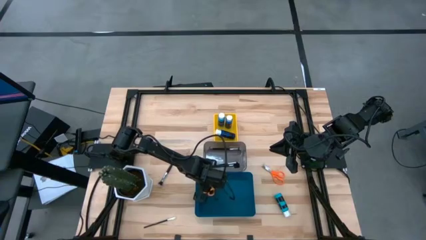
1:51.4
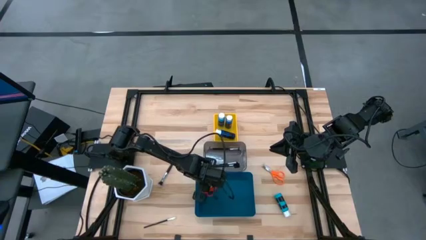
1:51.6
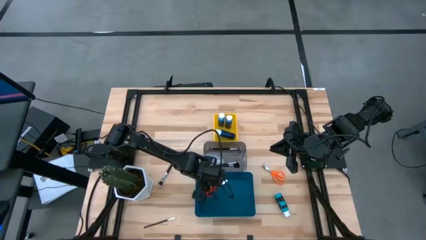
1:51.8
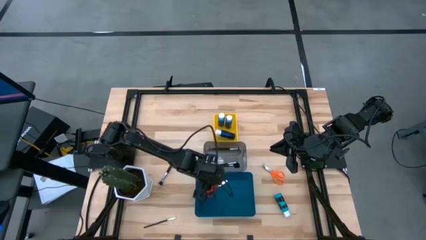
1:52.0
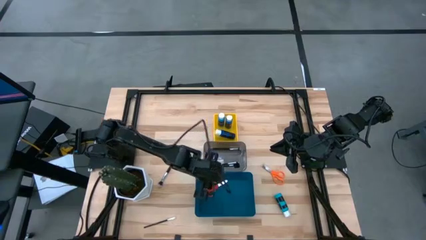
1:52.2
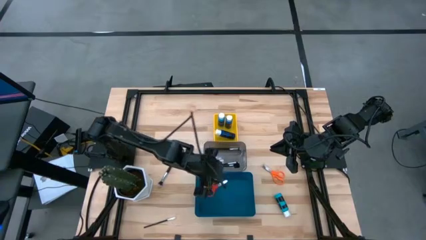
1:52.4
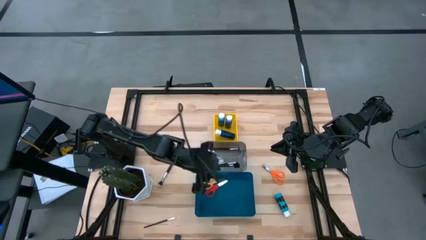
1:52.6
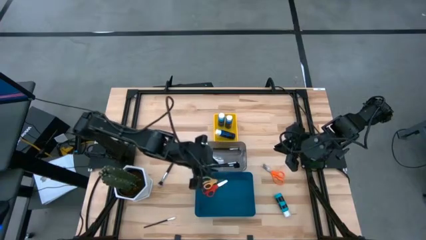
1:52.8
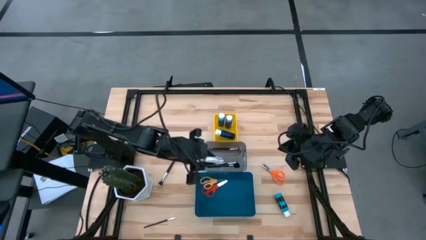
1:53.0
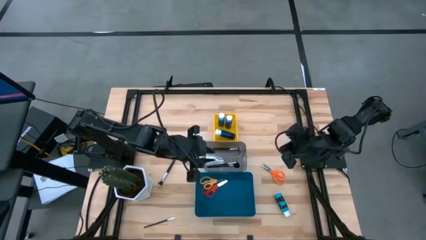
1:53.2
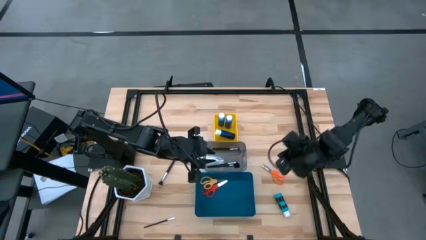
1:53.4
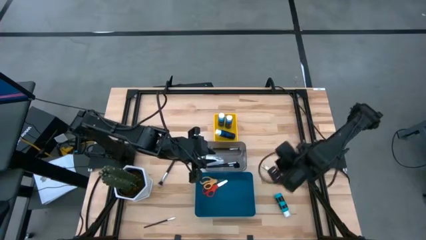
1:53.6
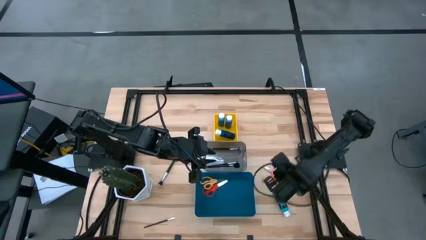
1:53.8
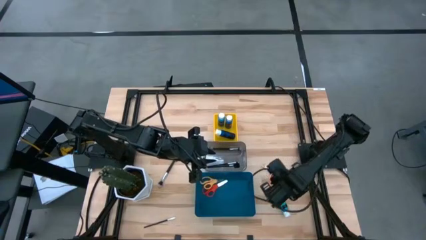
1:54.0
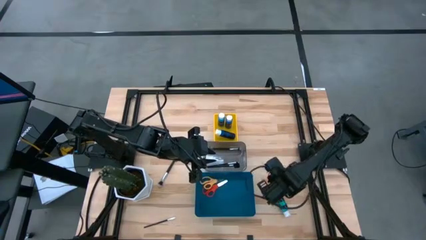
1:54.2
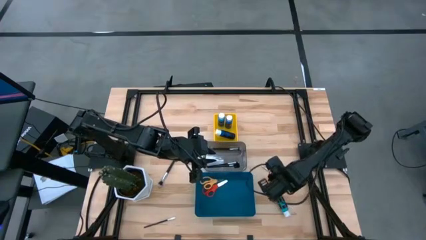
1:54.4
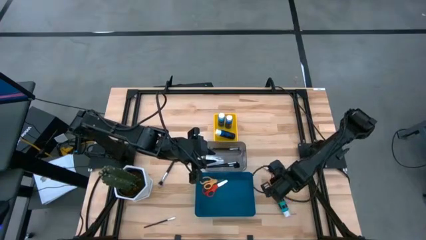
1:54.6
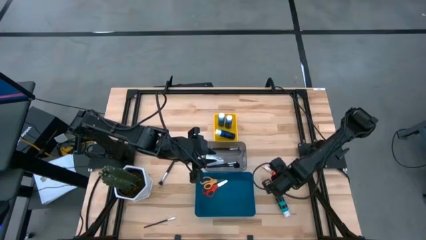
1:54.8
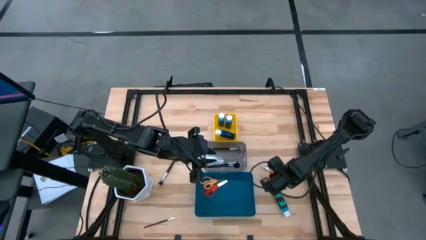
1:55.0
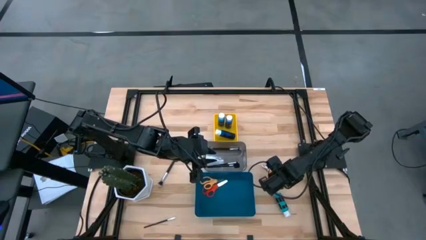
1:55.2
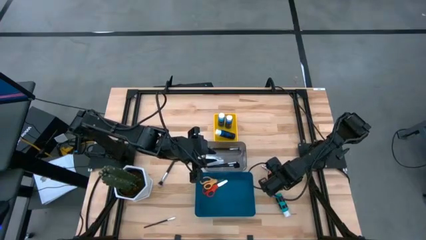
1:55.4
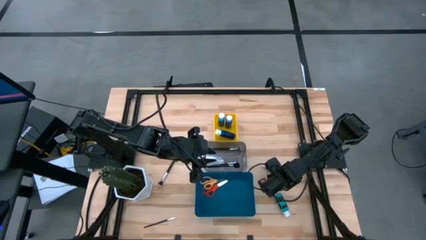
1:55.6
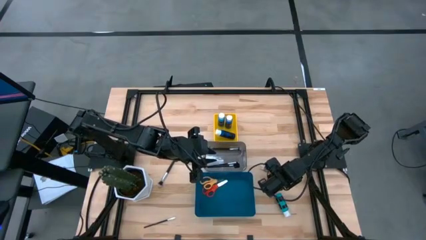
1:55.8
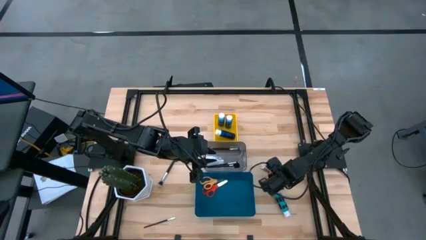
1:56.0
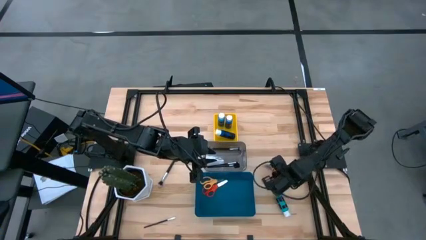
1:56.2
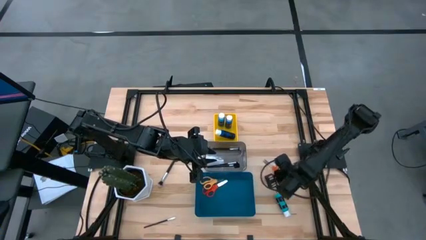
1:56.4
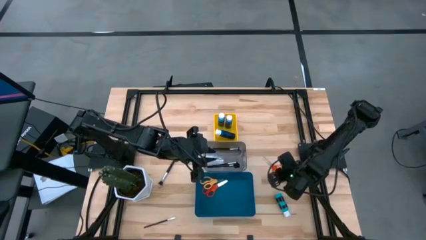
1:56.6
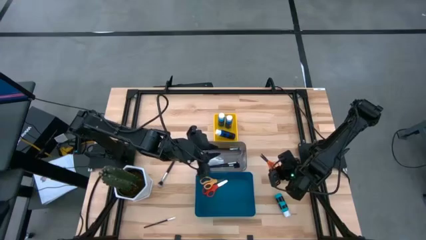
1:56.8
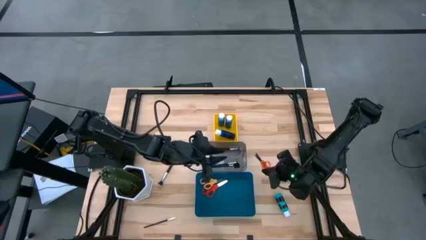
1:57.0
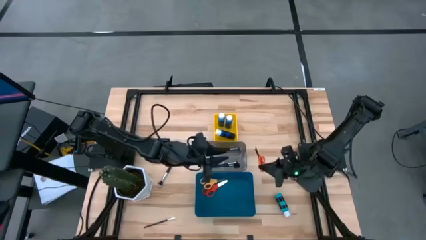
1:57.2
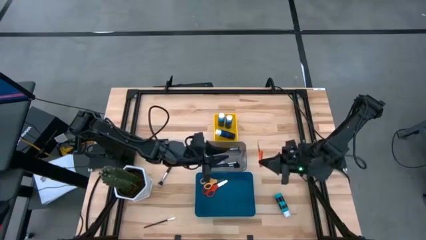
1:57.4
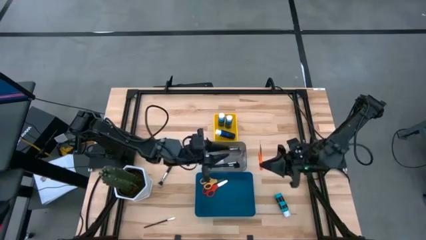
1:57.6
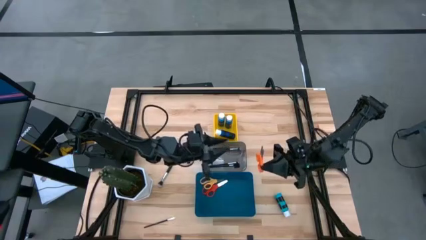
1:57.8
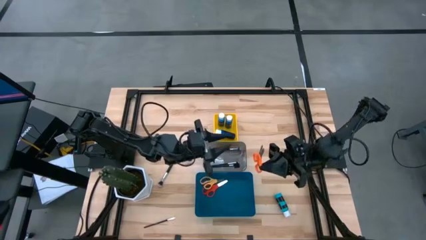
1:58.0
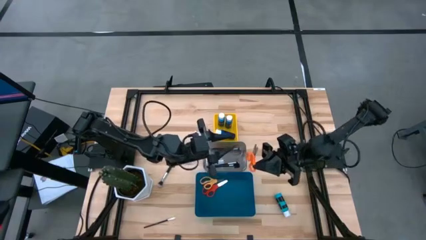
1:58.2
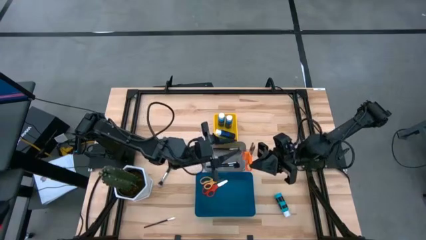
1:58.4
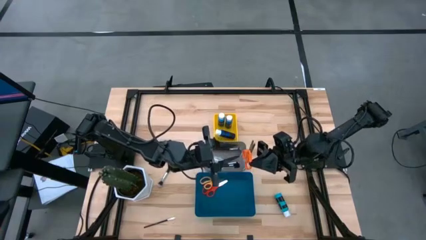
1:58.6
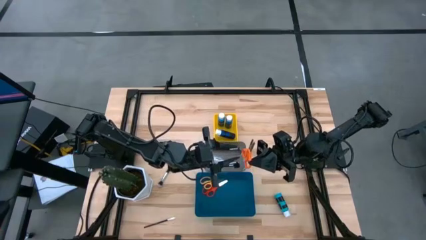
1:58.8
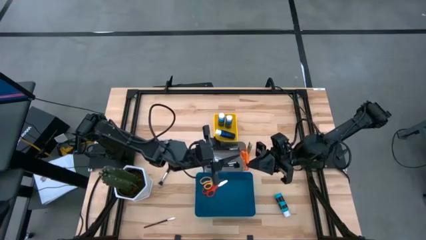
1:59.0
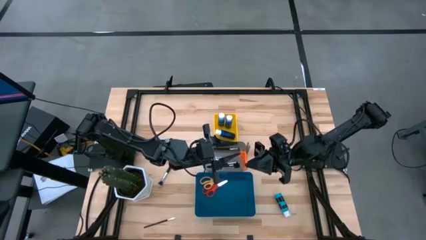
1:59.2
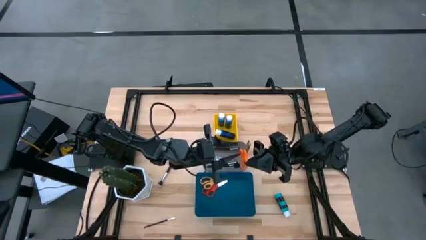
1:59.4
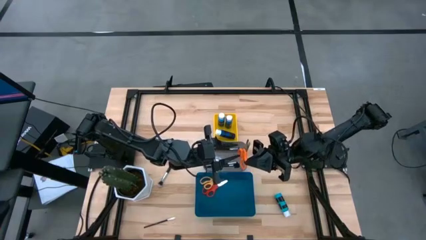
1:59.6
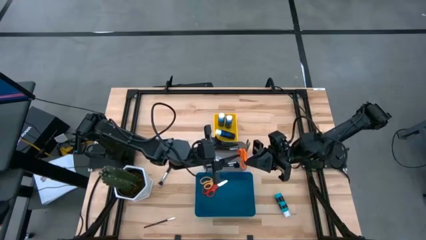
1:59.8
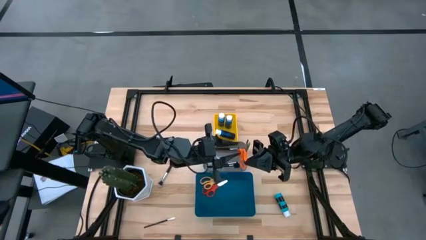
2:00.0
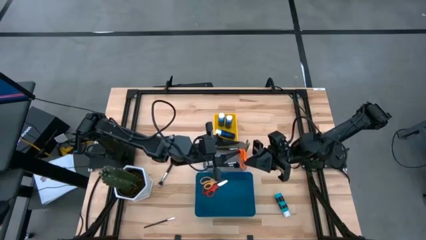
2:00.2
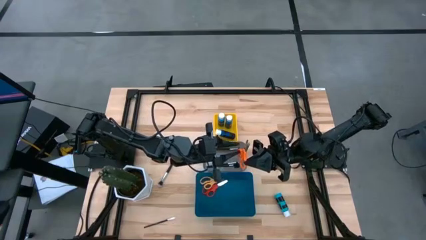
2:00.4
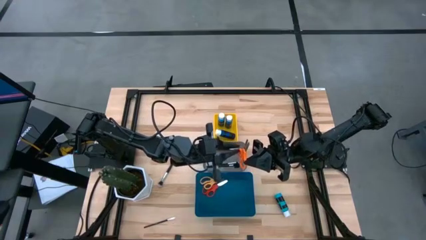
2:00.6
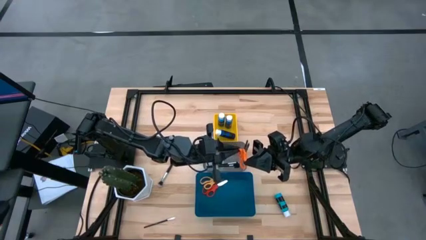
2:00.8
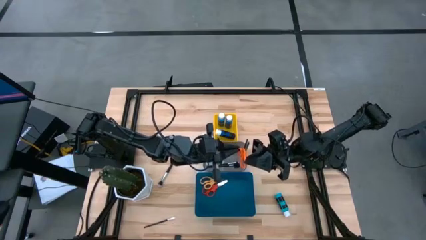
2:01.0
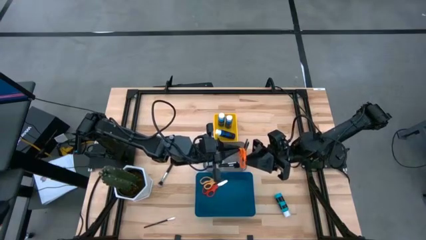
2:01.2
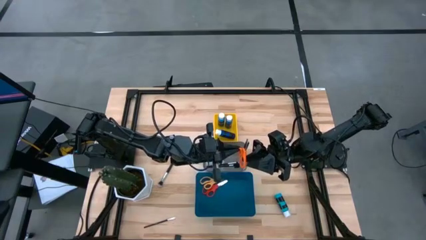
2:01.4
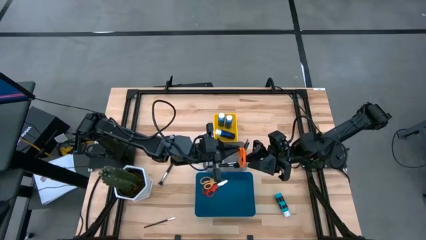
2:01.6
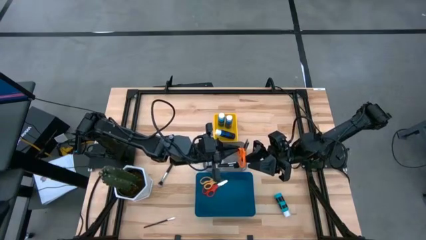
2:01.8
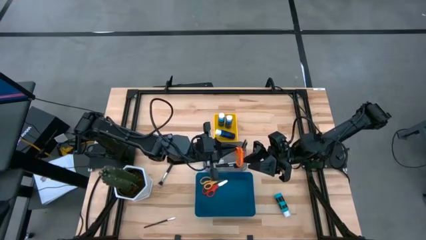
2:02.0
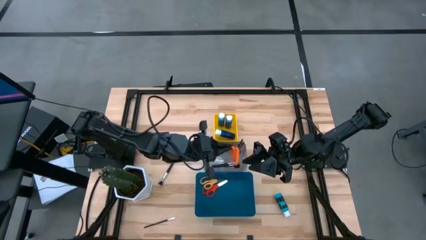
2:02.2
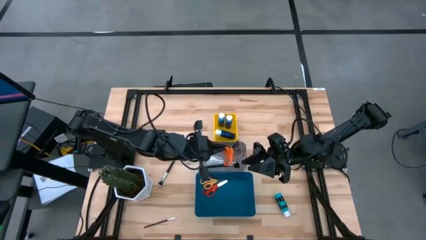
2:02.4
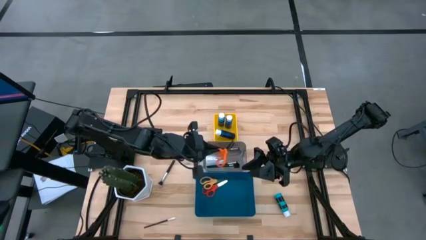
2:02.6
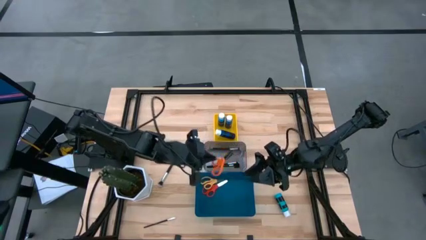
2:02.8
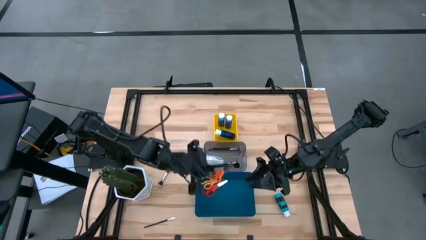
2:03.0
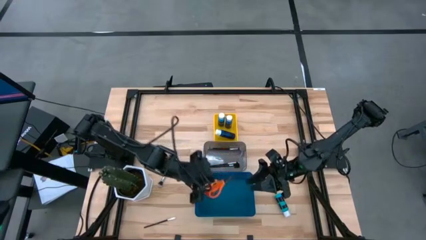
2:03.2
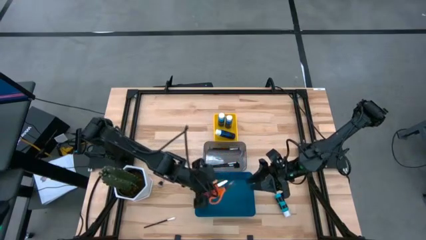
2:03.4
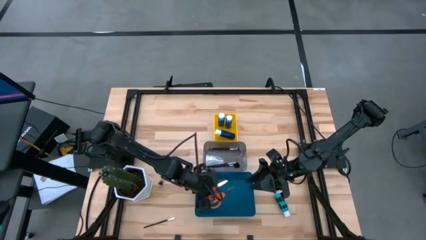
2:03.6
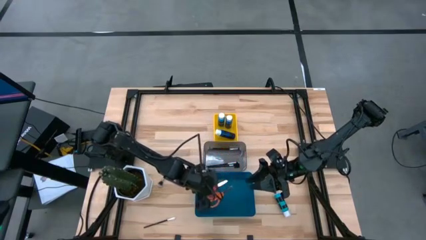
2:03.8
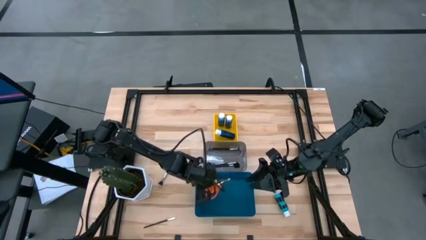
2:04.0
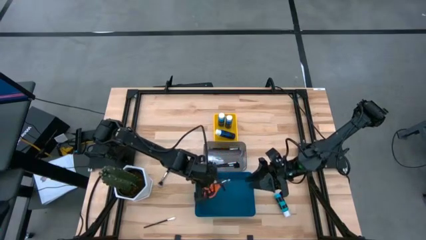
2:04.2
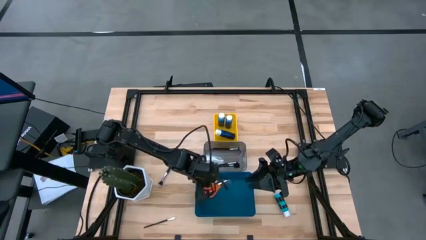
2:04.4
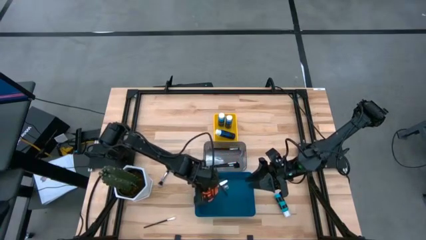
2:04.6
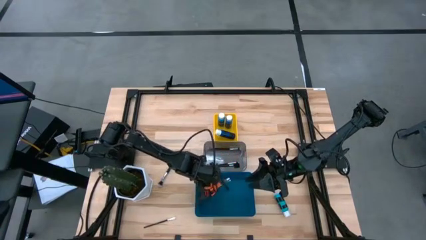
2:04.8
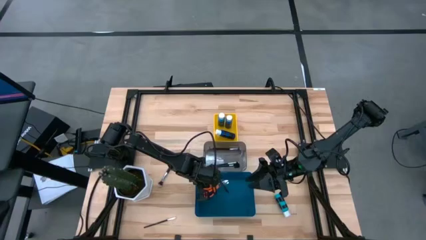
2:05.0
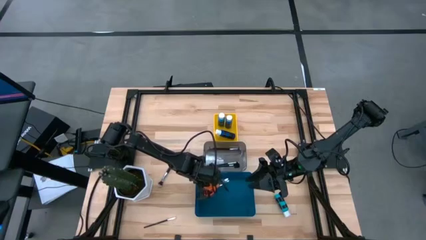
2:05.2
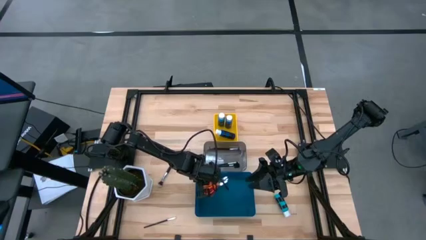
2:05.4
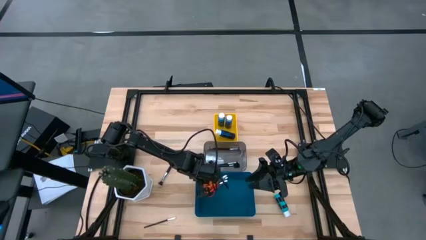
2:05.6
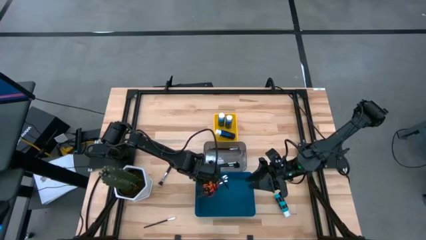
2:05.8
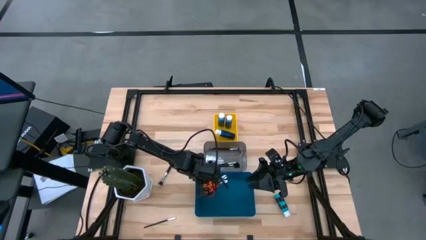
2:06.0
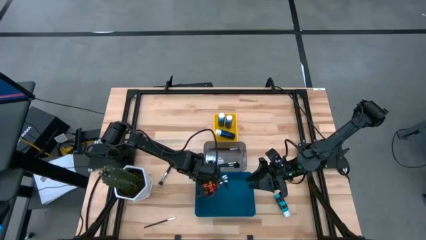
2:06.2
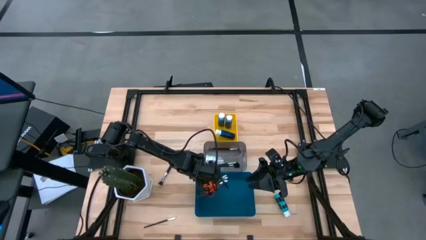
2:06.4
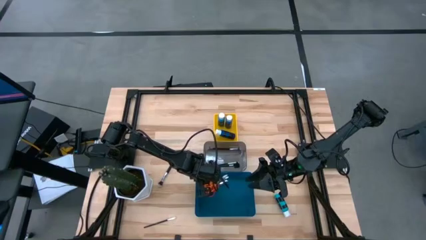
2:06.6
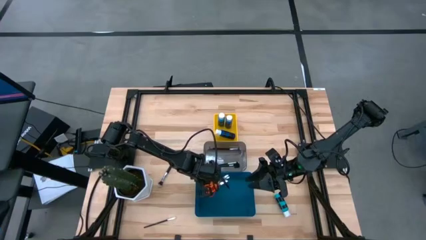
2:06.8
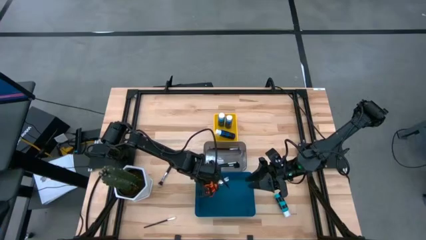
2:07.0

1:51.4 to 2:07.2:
Task: Pick & Place Paint Supplies
Put the orange scissors into the blue bin
